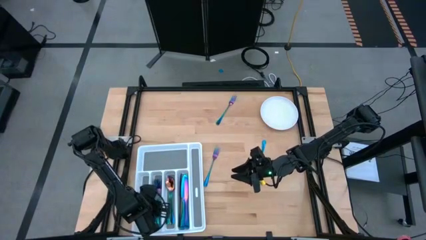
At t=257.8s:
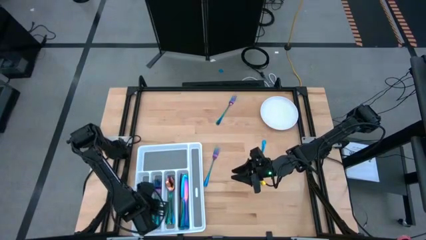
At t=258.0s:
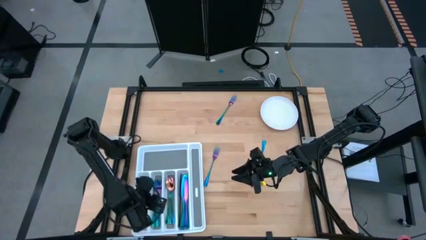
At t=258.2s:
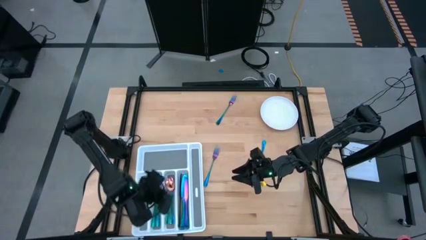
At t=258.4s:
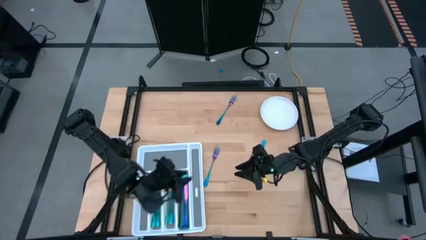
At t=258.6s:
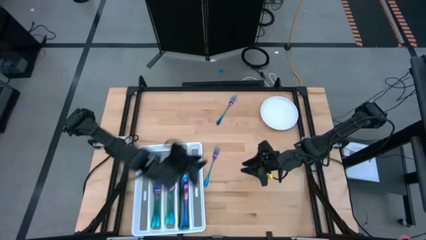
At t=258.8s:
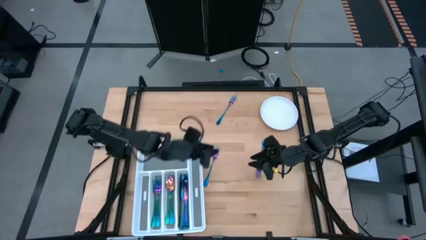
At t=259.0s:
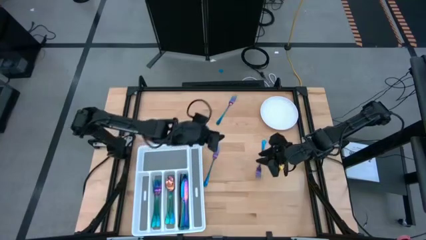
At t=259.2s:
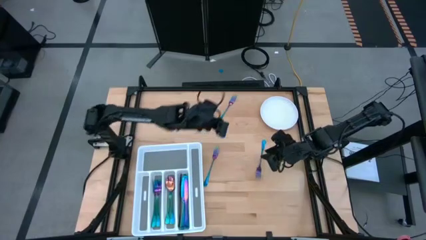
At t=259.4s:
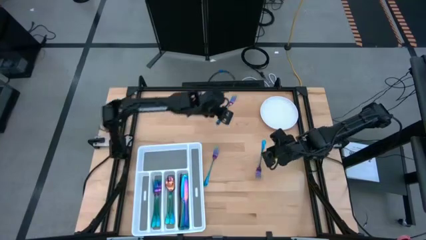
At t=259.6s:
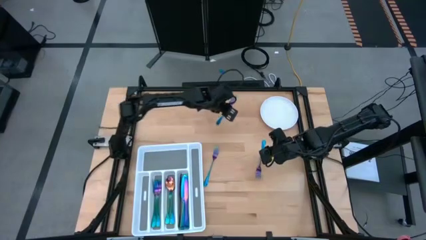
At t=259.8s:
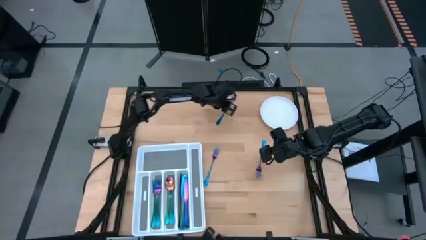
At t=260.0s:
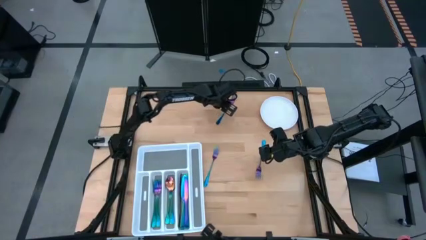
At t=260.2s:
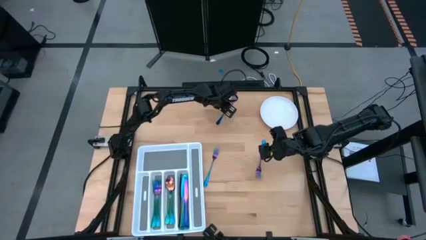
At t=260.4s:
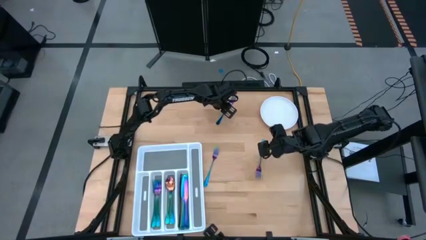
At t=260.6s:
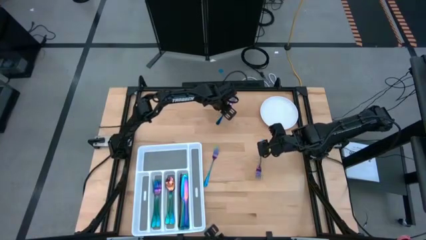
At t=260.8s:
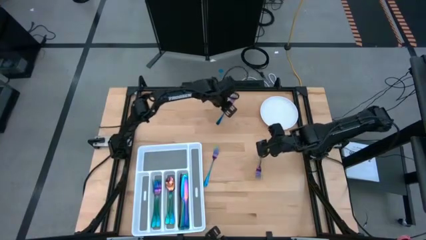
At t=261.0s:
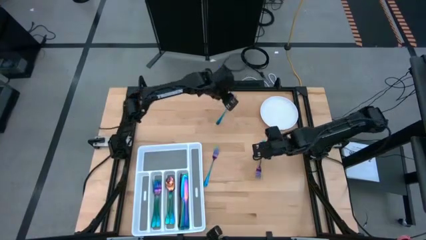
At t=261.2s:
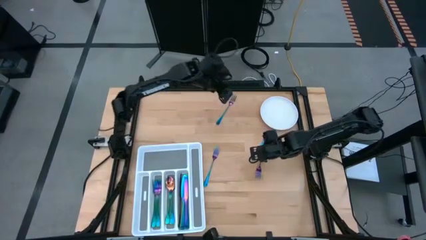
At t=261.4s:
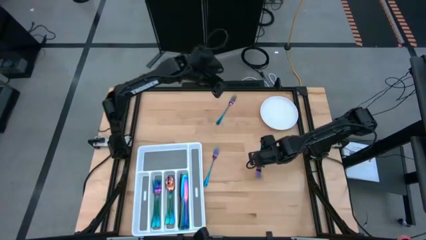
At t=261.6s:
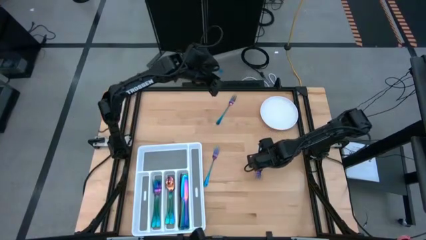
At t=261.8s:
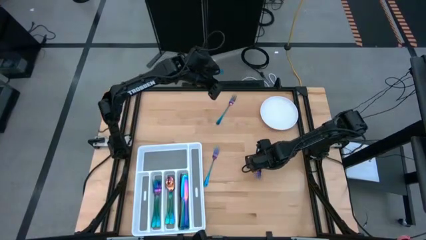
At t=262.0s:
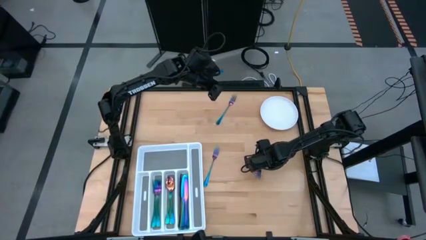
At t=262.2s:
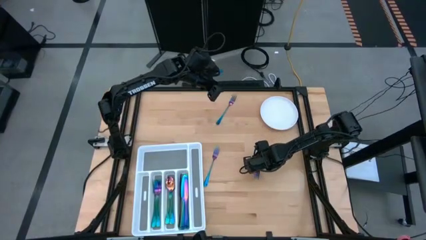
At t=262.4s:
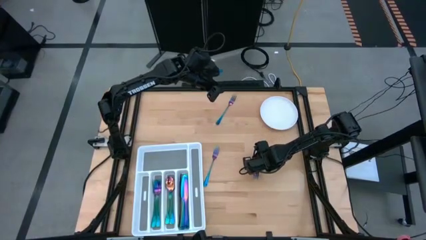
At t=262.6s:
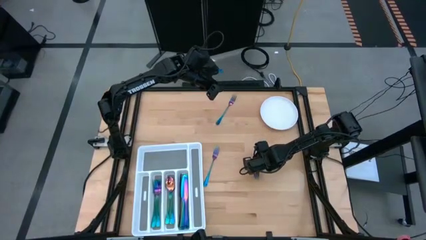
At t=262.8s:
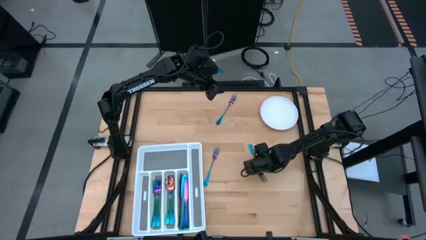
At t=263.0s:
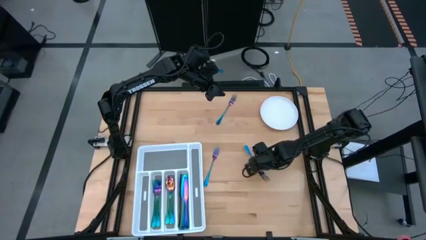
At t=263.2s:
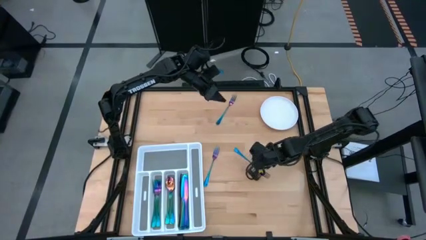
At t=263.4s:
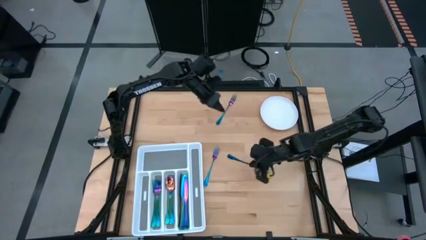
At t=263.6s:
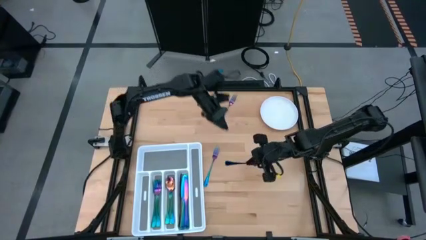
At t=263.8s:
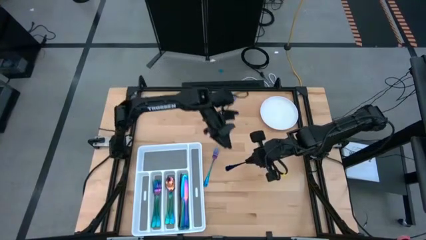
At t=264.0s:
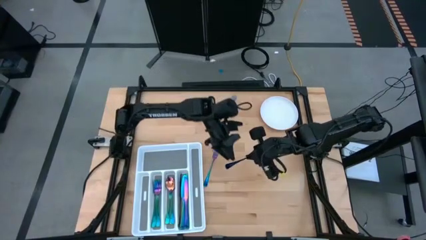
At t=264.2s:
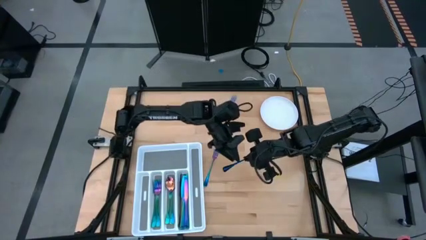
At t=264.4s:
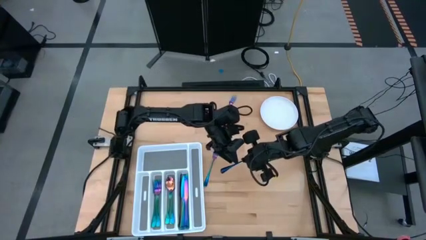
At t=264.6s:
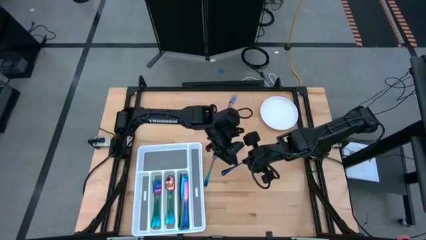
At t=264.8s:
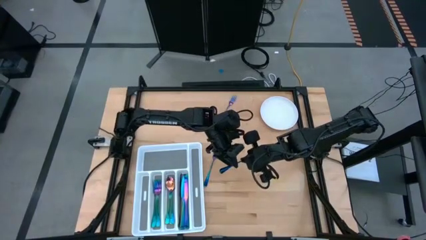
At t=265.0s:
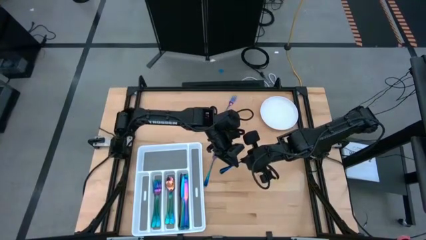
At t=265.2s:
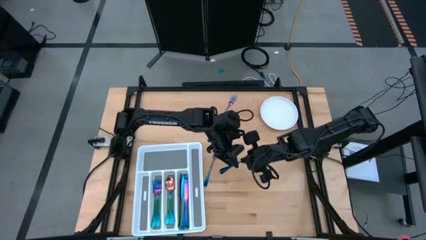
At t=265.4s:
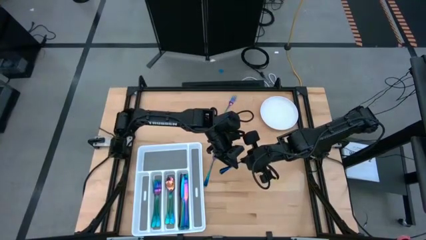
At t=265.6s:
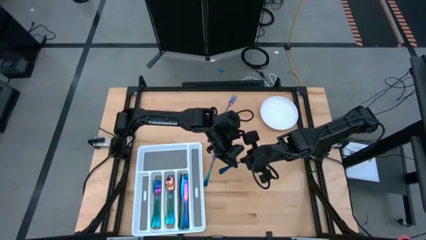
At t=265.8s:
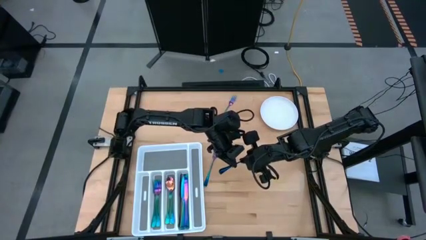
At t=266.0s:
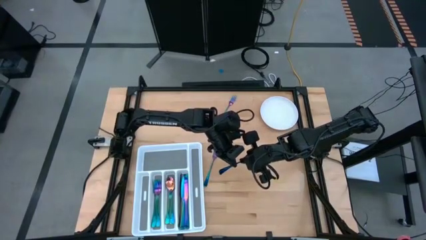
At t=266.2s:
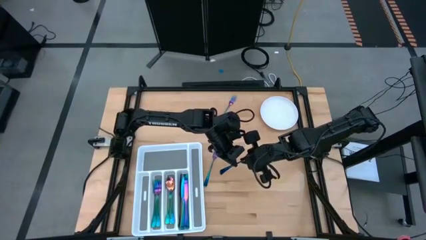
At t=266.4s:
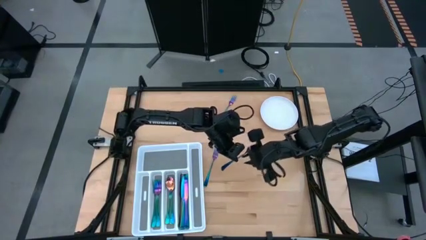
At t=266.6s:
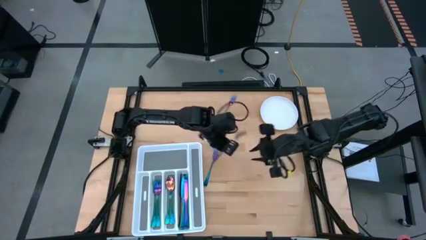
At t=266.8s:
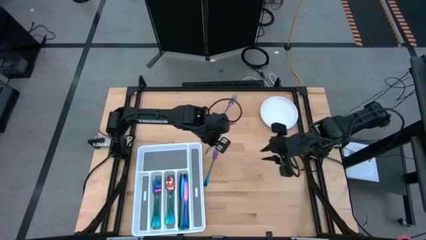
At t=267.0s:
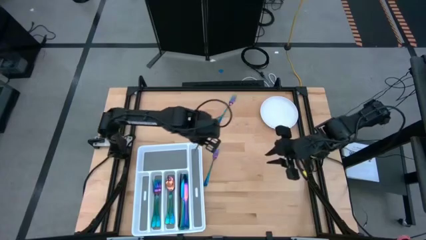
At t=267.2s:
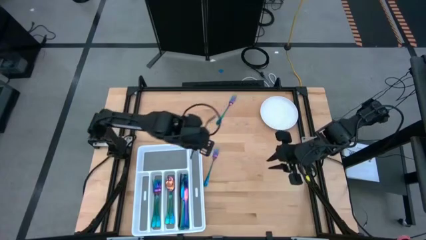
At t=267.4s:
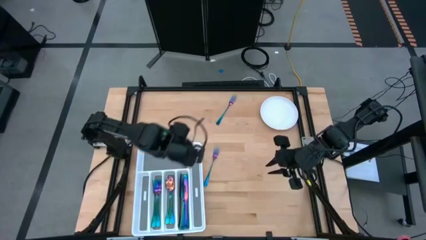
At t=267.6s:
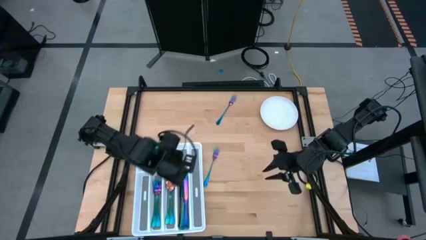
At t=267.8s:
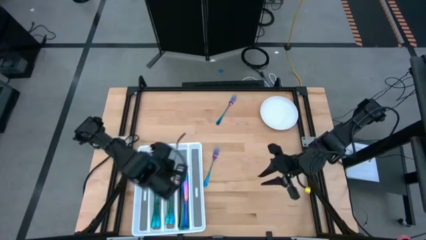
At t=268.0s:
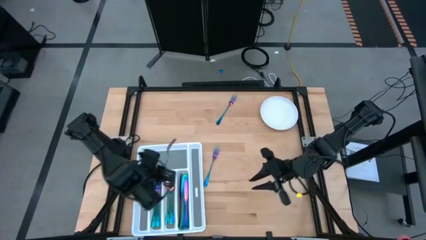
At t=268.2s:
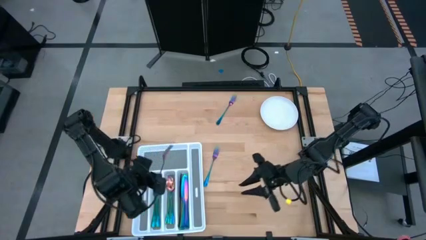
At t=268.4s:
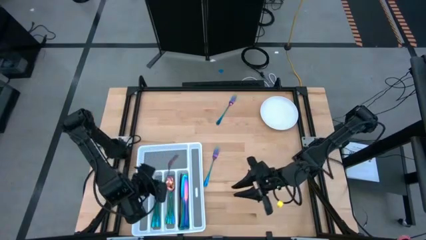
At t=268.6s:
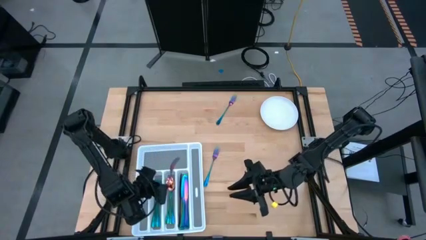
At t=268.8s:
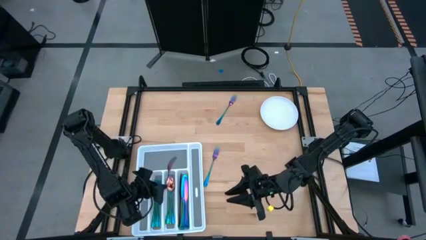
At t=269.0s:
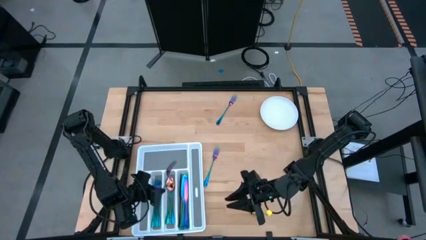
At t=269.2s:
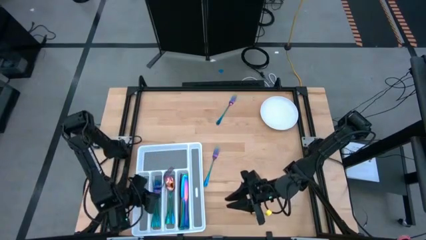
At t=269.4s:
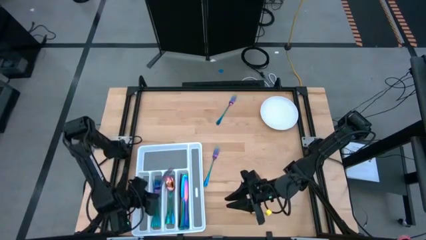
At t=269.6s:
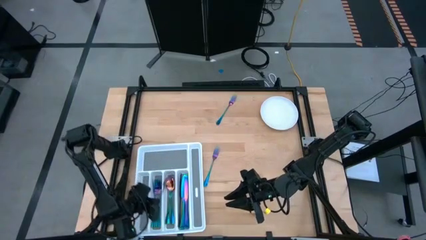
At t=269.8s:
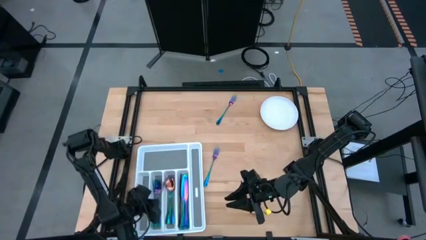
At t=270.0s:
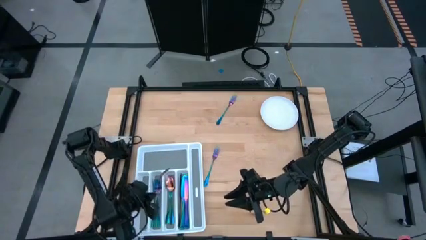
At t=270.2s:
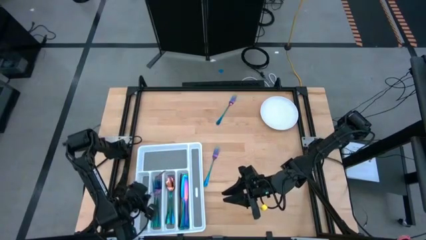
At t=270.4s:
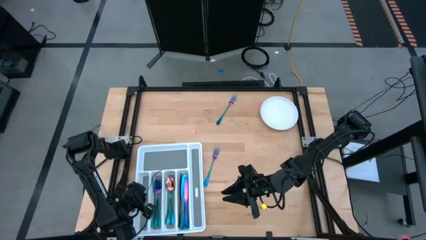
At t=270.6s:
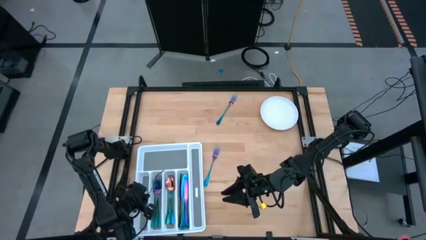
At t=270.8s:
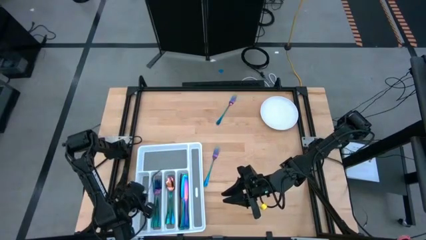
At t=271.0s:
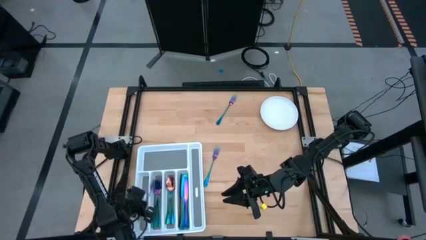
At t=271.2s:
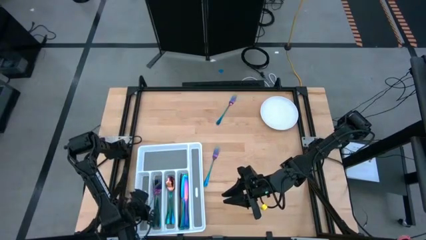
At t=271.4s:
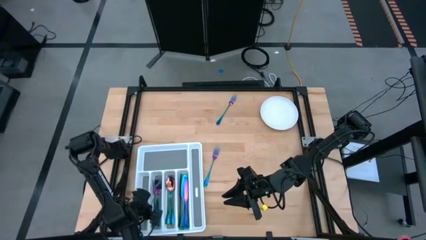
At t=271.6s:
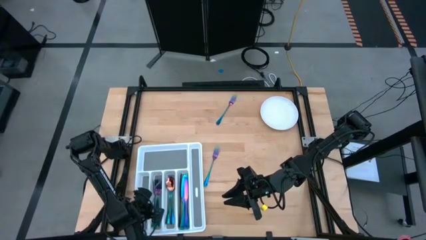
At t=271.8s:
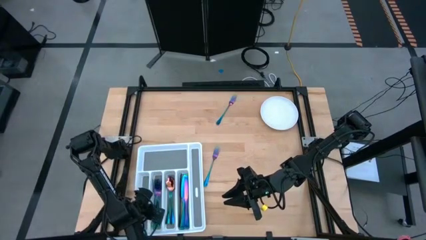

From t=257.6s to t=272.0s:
Task: Sort silverware
Put the bottom right iridescent fork into the cutlery tray

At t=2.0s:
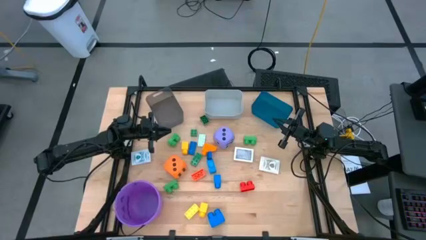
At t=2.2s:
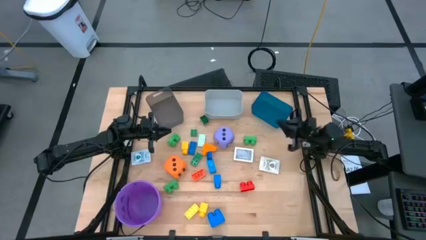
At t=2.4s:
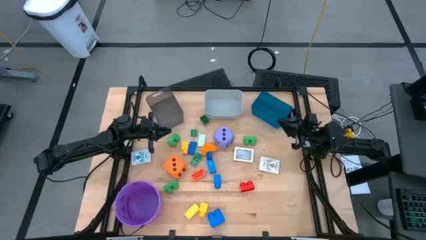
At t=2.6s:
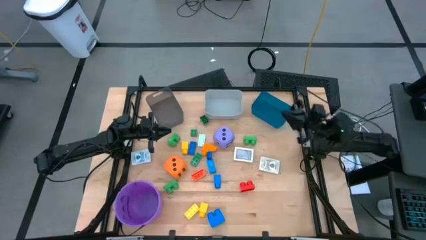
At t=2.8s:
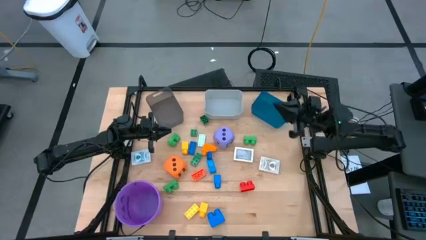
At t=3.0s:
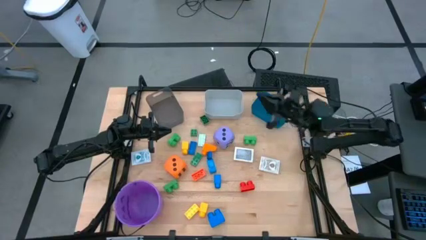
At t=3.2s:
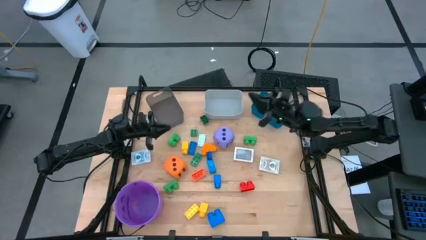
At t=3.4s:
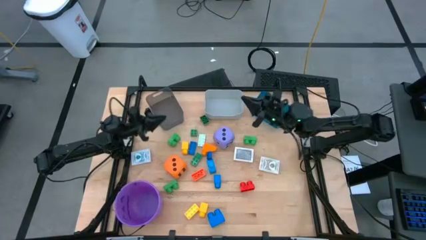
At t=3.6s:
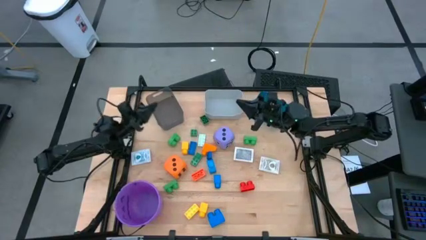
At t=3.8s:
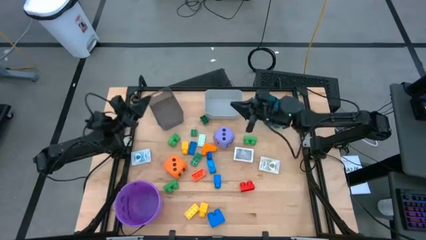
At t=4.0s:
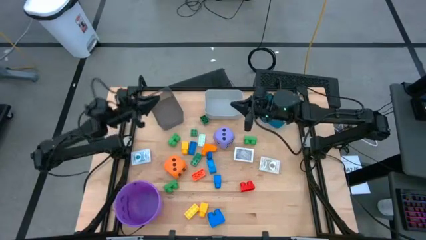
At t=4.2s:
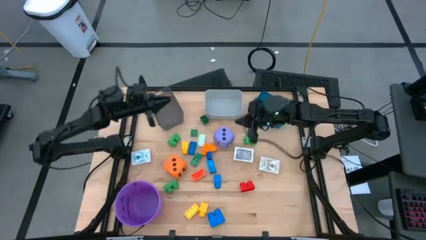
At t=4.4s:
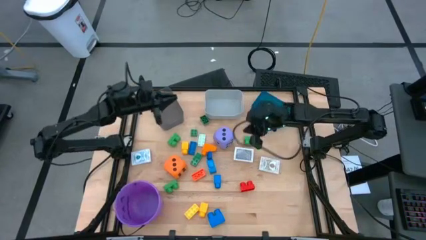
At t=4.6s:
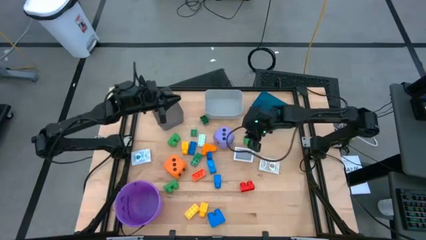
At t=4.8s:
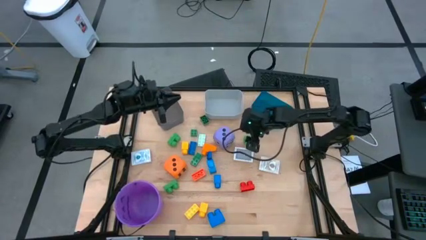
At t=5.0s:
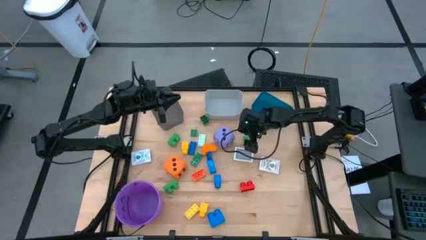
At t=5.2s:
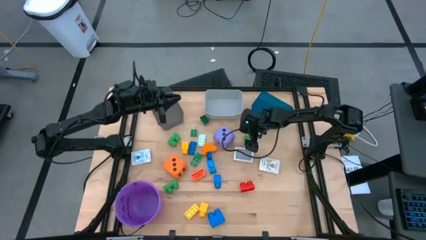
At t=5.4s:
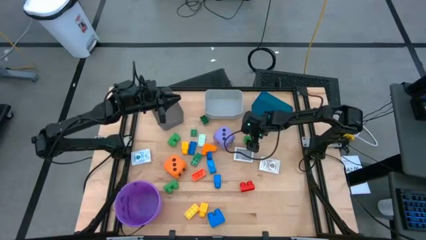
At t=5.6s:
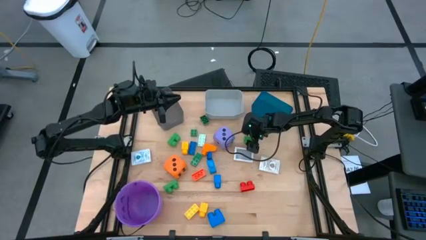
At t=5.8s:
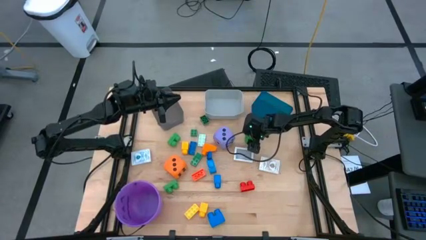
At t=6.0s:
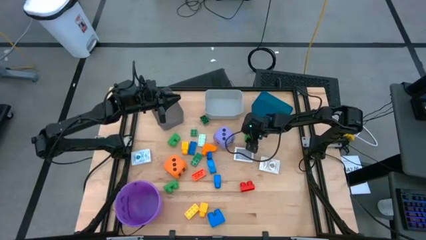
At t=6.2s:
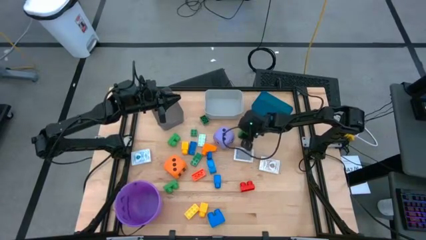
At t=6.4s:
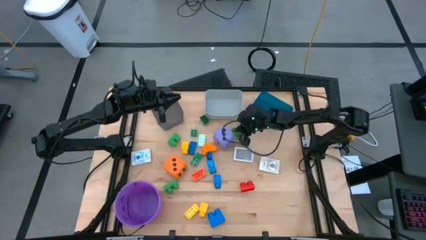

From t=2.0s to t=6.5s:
Task: Pick & Place Toys
Put the green game piece into the blue bin
